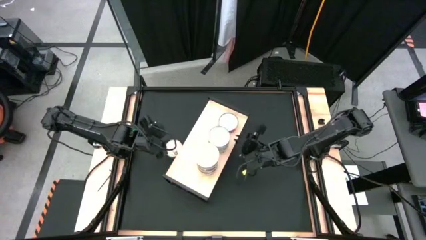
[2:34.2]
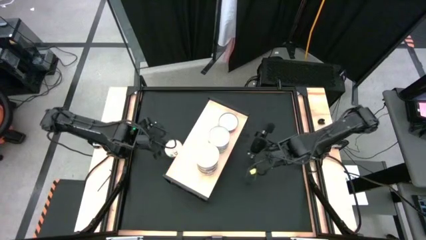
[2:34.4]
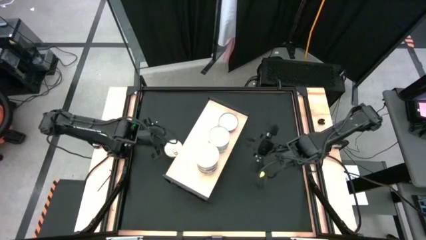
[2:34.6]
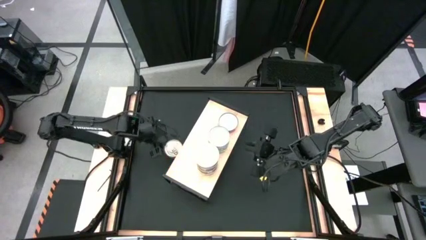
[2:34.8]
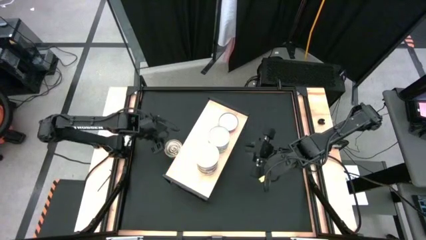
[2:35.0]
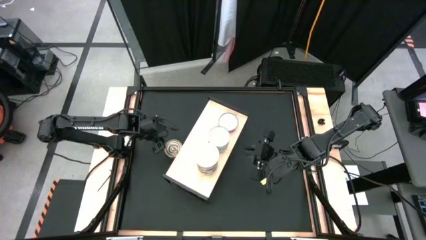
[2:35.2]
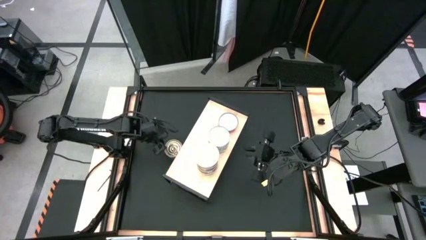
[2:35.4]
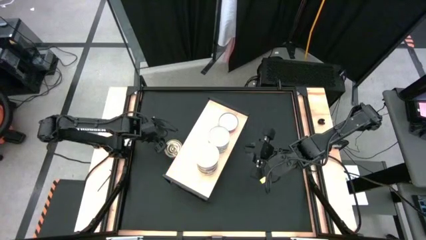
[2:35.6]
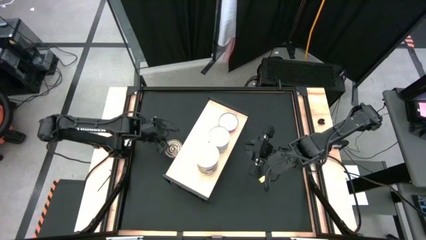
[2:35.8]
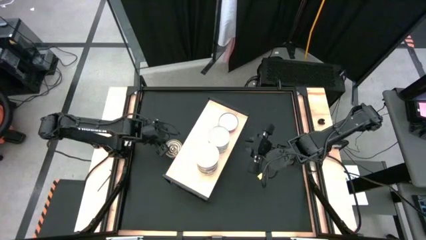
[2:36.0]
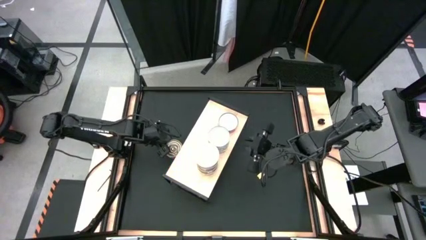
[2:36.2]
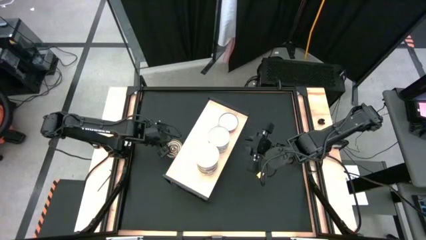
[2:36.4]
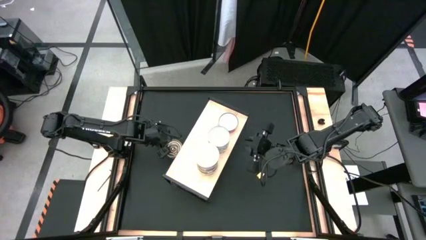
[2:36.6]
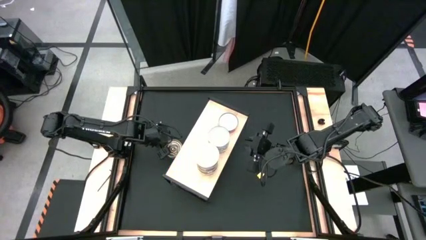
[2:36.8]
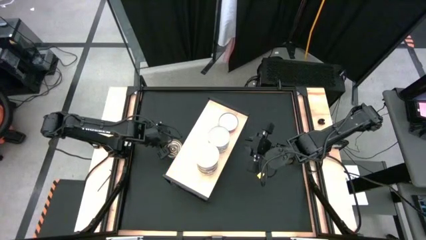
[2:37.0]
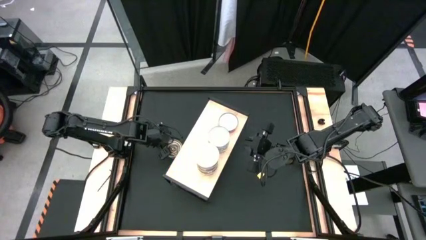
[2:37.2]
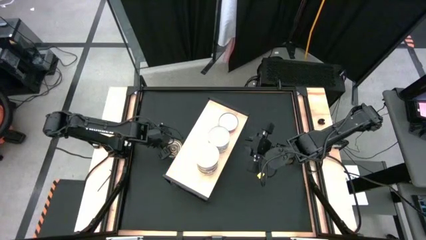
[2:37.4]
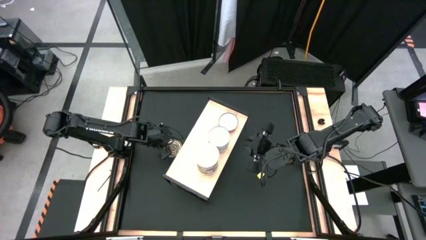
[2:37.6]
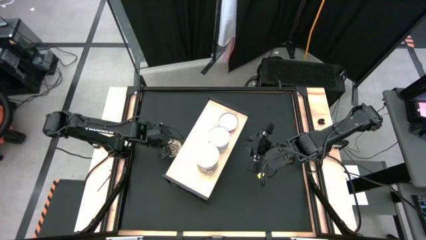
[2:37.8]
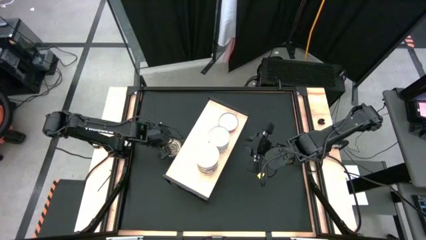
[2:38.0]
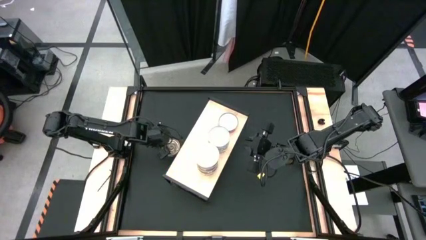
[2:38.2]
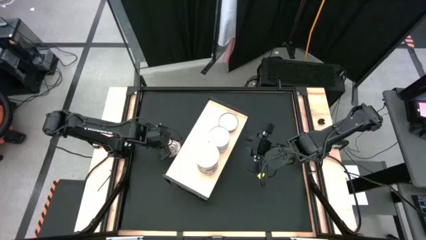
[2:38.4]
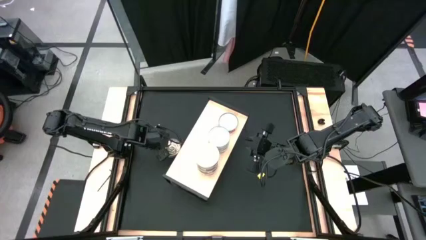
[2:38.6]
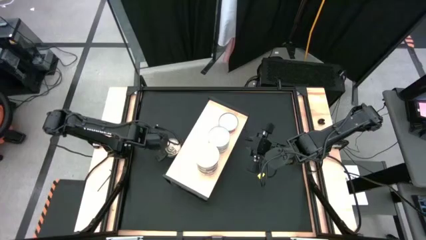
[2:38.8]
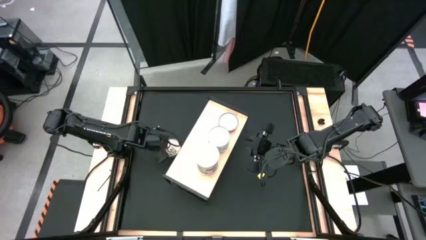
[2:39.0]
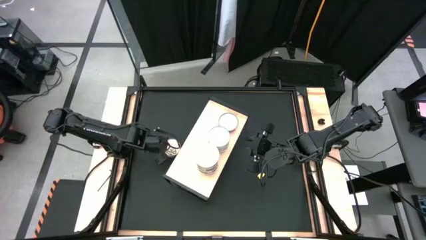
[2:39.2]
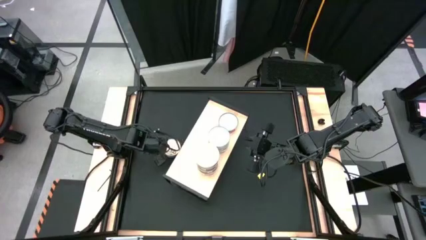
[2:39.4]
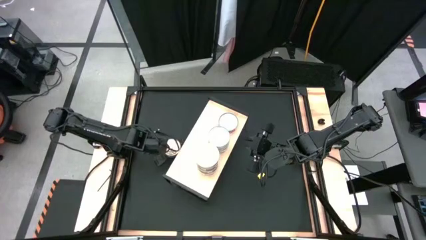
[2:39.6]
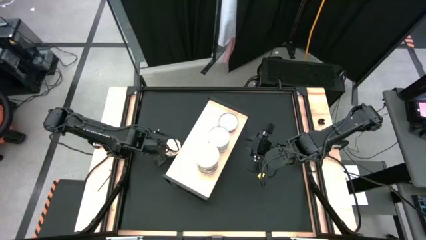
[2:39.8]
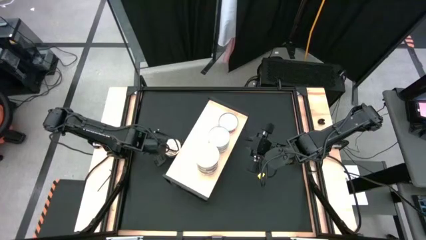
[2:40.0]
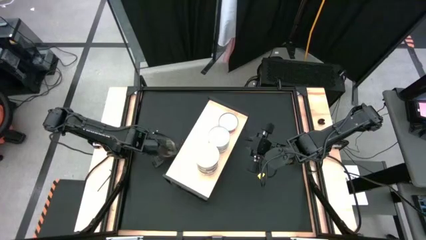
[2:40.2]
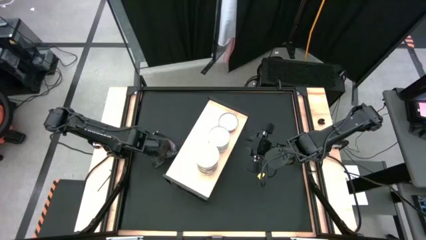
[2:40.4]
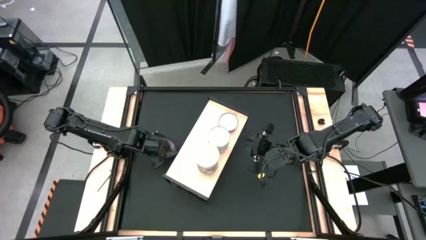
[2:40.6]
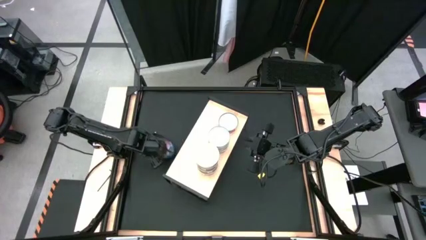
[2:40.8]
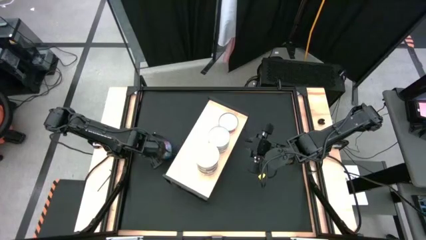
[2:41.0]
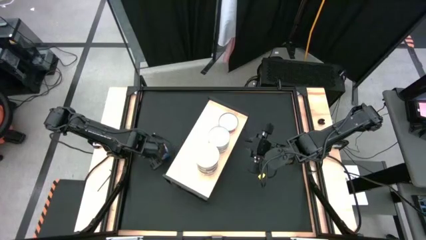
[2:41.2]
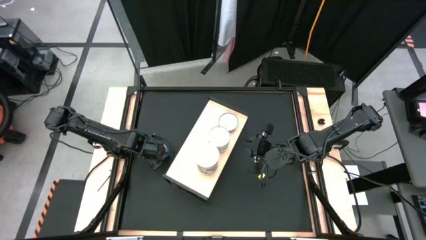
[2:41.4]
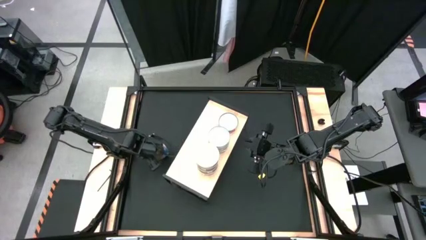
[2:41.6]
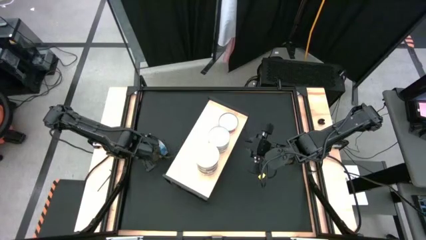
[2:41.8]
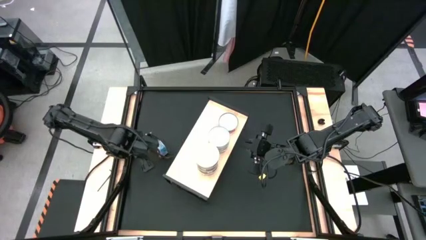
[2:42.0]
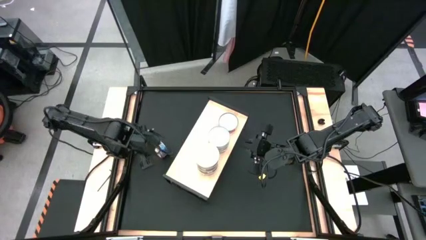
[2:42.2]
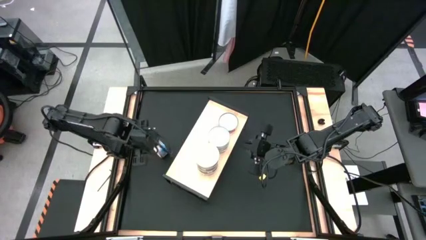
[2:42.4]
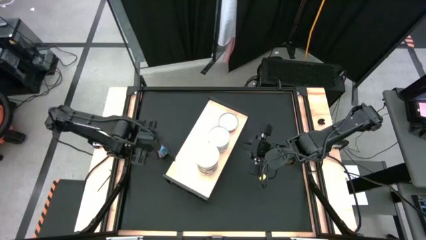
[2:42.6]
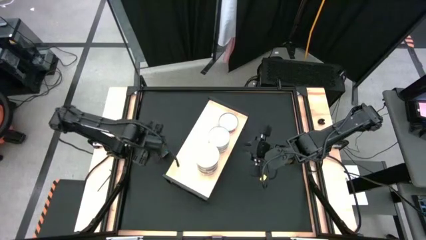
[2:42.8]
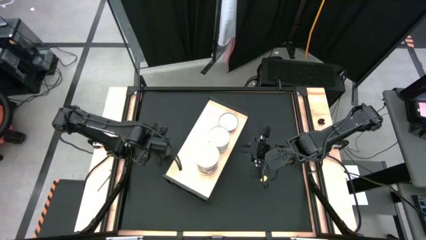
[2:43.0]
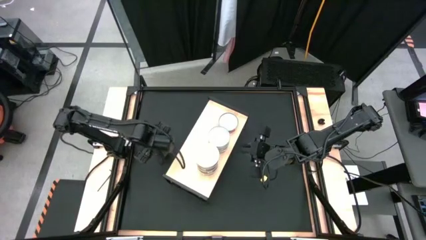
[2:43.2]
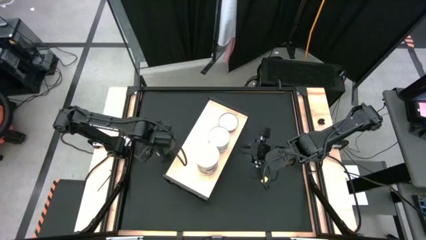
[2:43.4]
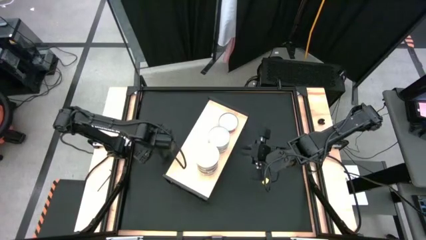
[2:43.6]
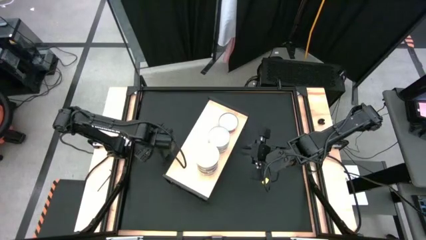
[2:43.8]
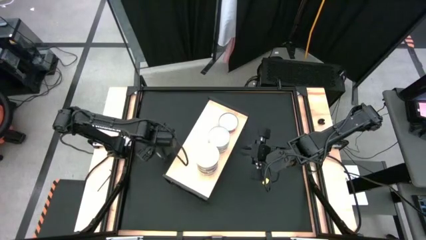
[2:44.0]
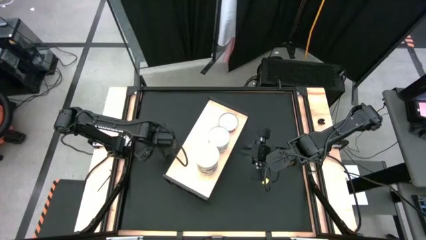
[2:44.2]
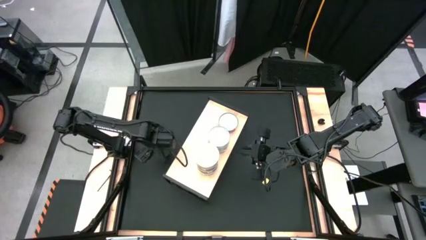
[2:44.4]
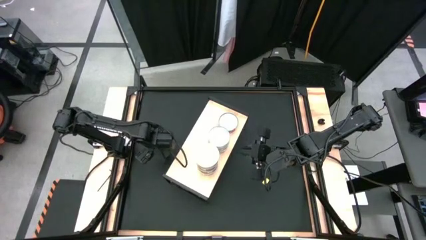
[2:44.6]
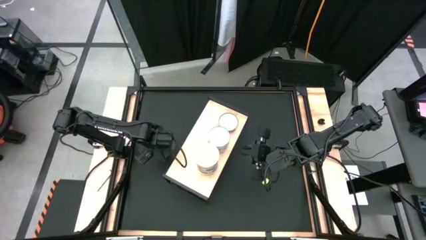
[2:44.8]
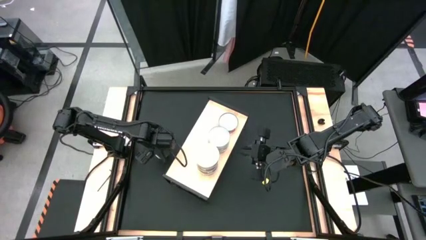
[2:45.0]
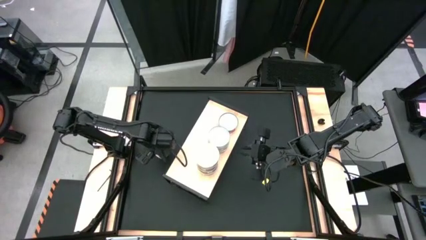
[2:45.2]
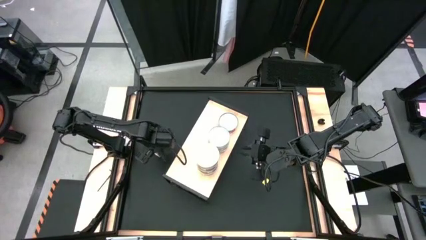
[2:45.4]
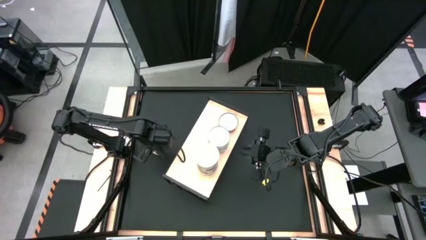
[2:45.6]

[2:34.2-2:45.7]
Task: Stack canned seafood by type on shelf
Stack the blue tuna can on top of the other blue tuna cans on the shelf
